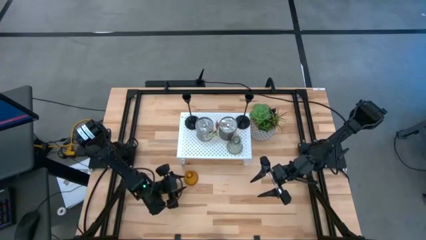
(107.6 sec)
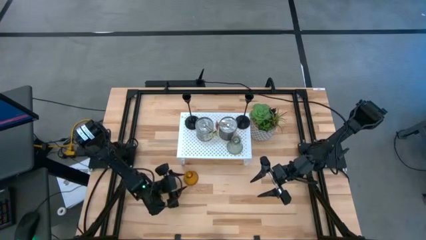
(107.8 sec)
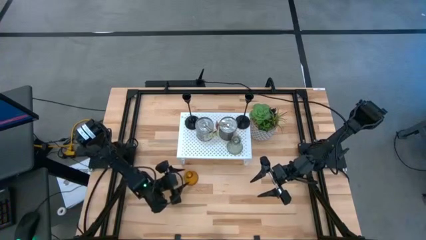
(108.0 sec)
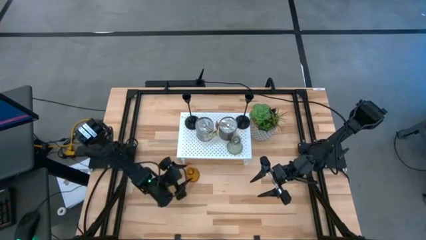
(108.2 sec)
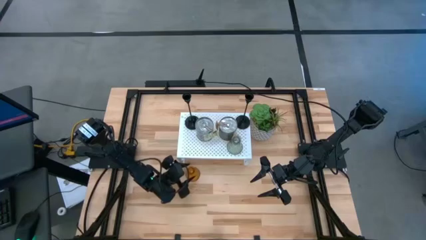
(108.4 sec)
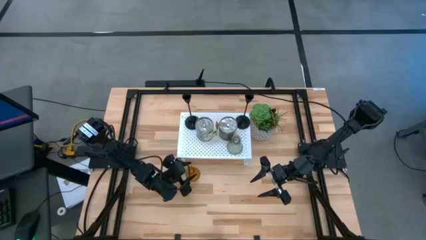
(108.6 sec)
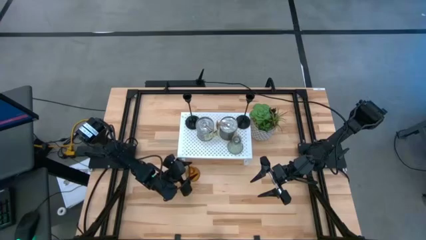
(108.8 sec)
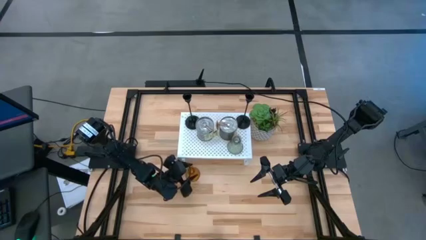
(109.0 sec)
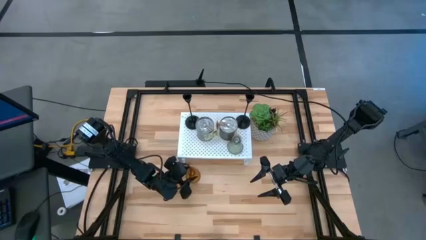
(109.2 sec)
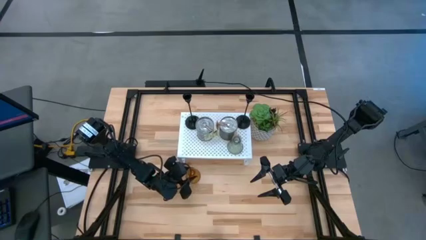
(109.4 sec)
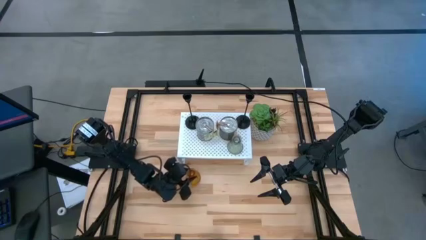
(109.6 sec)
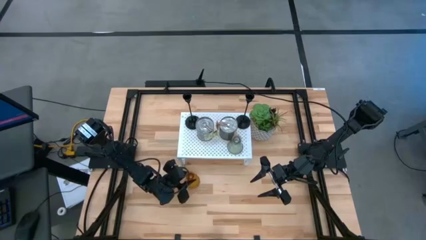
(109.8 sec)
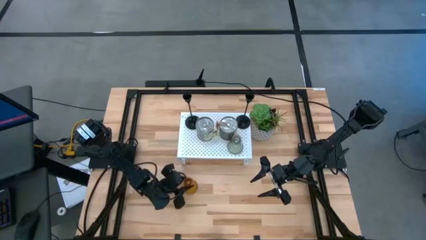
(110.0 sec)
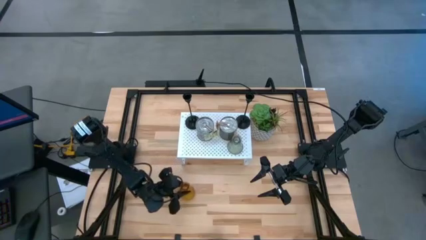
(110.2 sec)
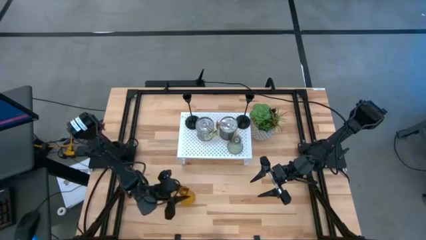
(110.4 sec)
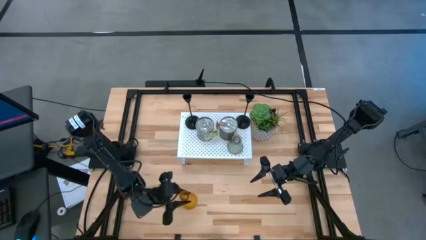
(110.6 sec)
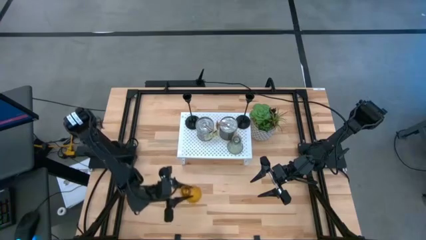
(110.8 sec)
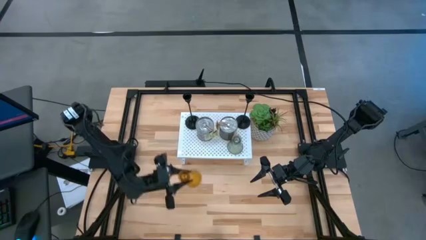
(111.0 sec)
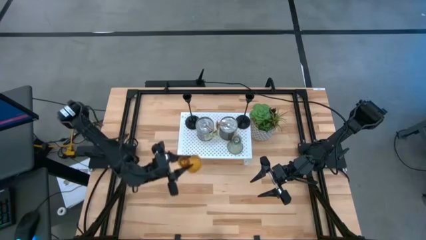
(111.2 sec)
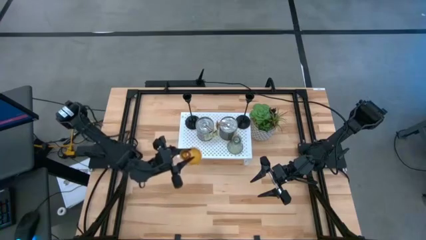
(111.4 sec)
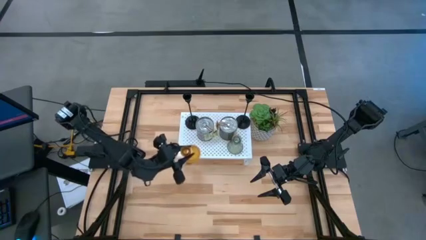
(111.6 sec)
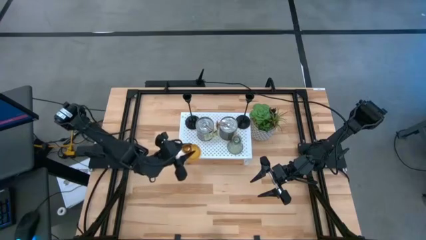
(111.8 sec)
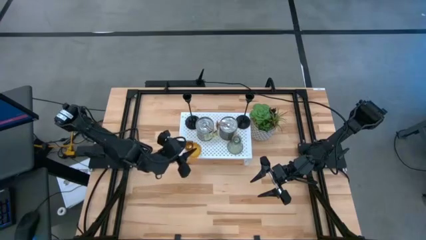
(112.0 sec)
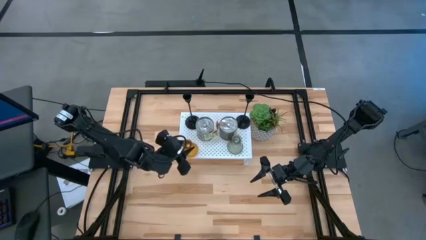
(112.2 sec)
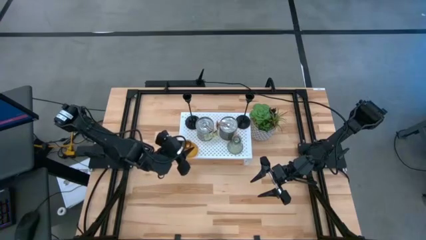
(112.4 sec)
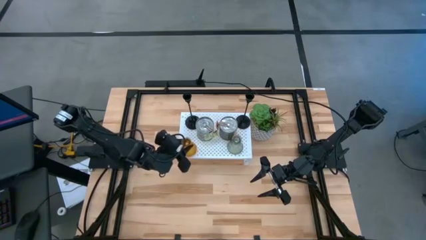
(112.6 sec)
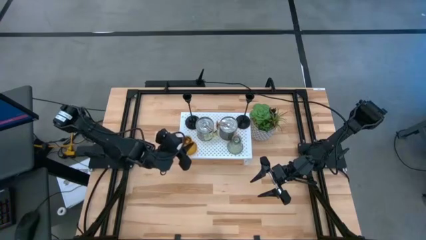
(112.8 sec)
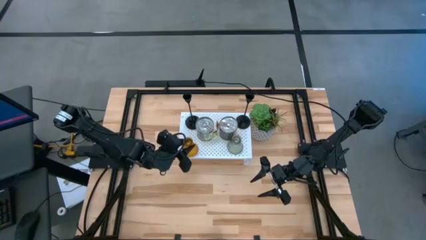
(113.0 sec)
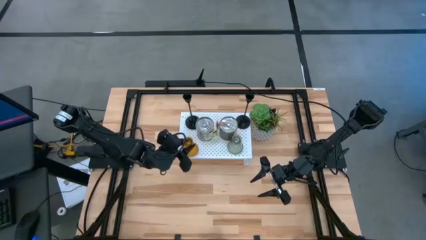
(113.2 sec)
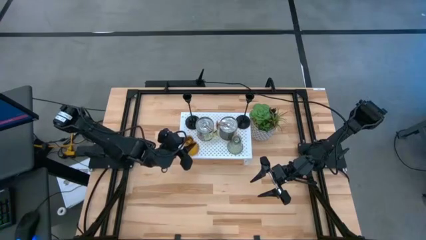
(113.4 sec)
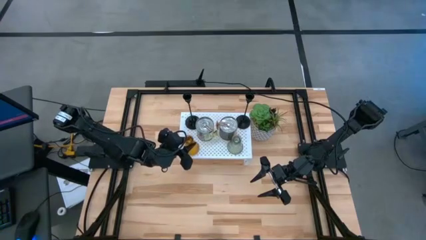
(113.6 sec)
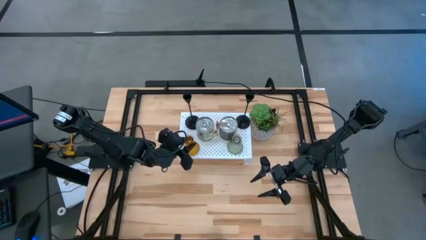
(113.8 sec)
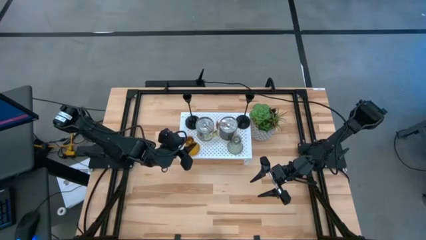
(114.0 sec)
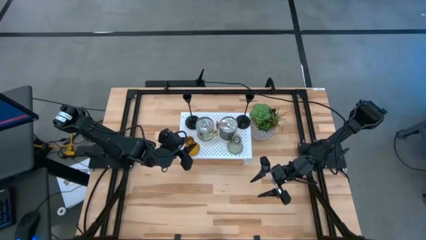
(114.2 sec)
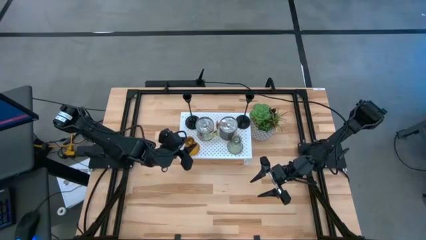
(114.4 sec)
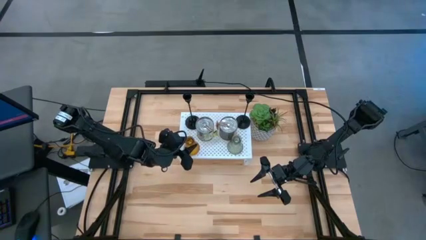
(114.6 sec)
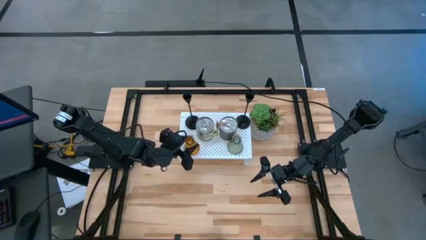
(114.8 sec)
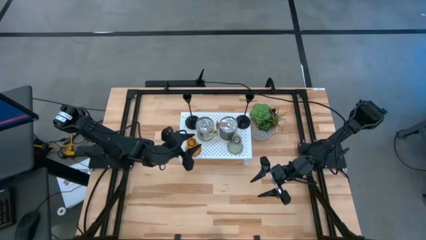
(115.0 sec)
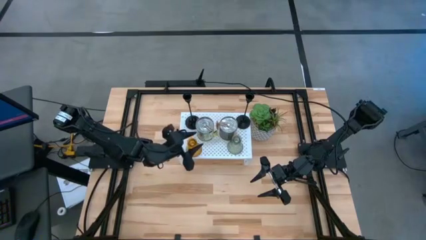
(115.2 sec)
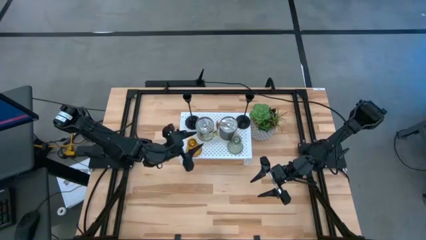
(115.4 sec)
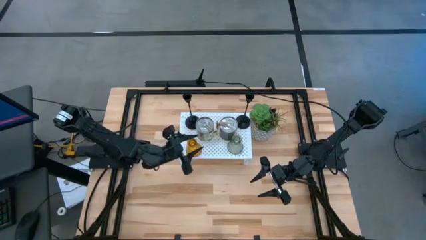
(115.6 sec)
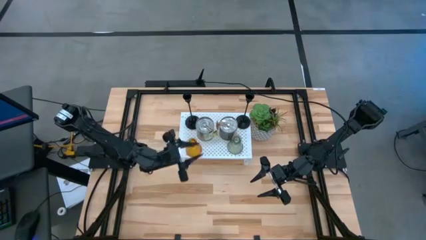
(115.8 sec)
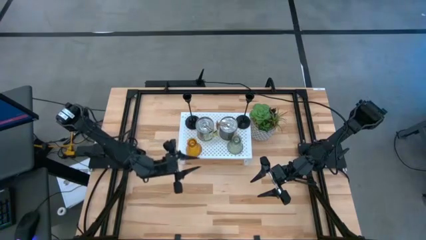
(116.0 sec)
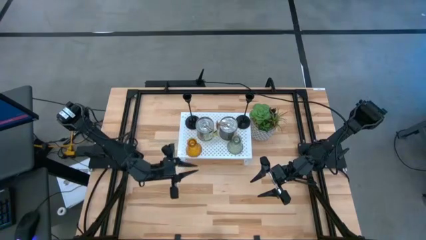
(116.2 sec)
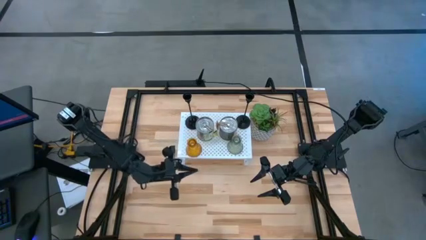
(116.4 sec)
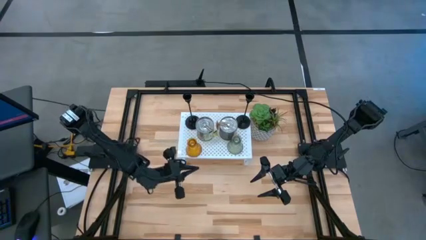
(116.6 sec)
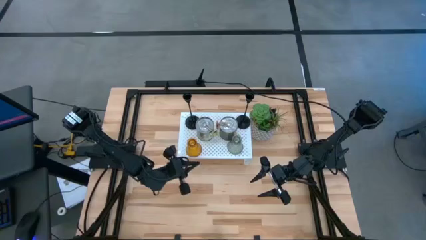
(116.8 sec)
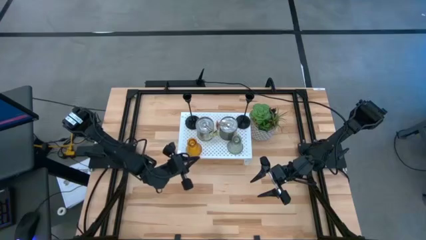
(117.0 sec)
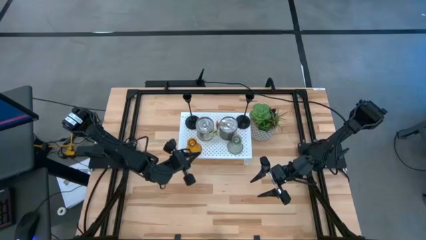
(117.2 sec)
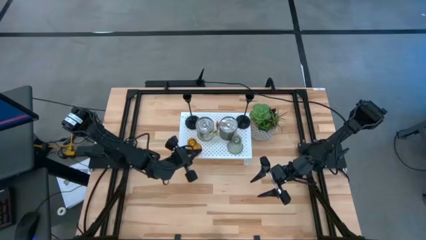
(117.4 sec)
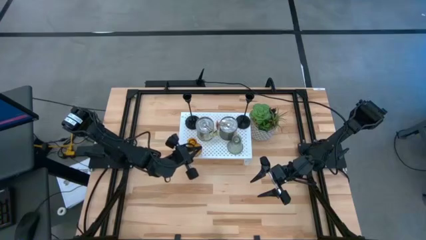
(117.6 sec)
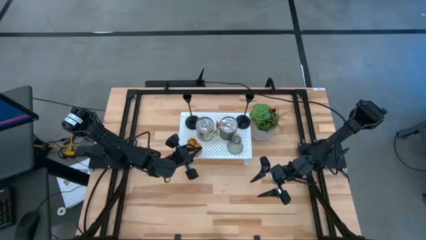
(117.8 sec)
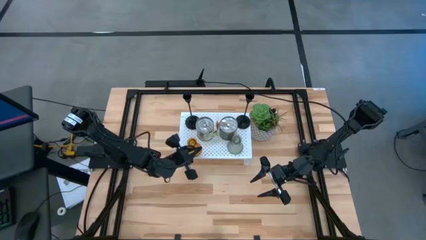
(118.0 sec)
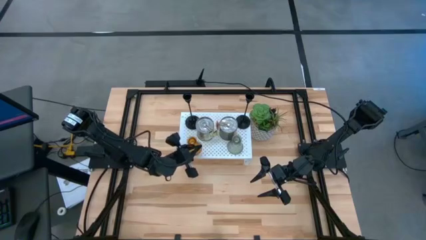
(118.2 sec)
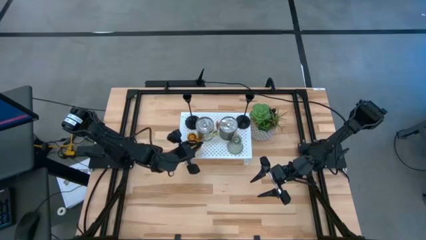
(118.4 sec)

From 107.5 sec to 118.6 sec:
Task: Pick & Place candle stick holders
Put the yellow candle holder on the shelf
